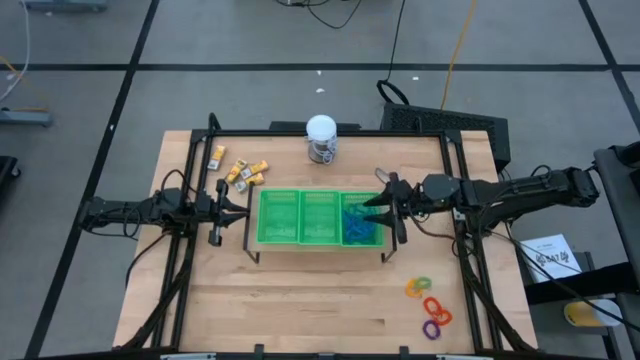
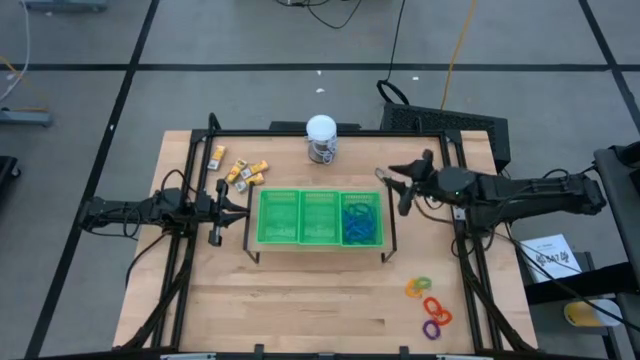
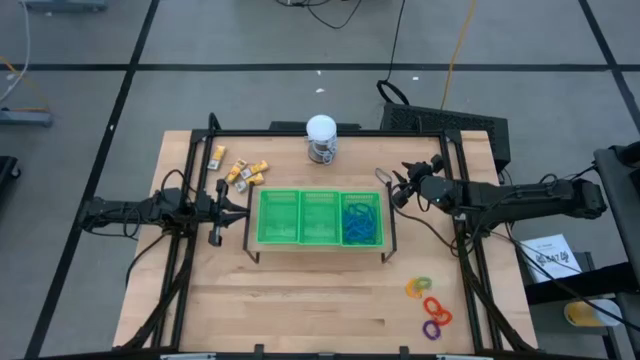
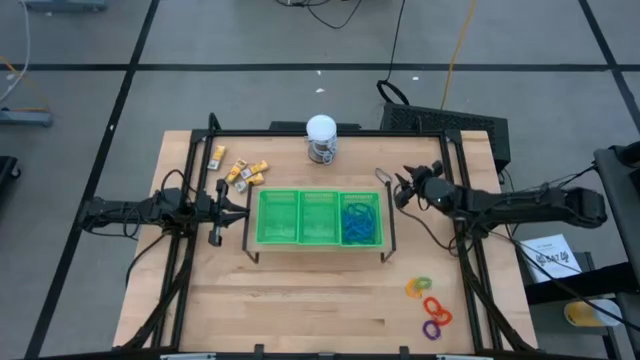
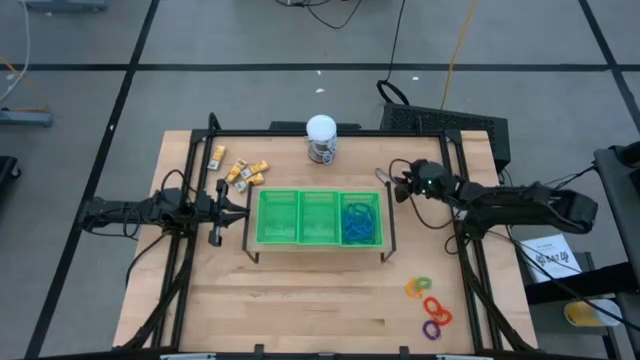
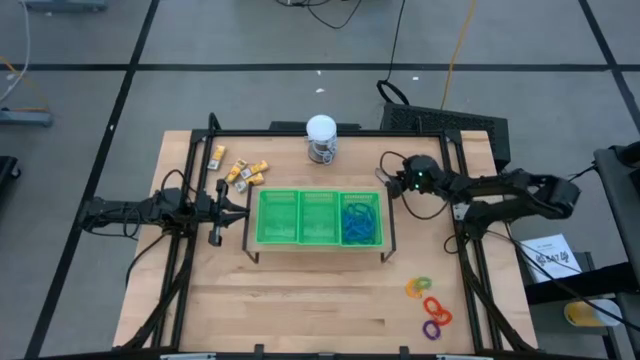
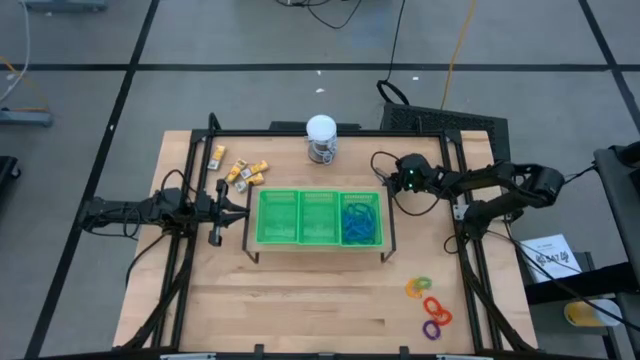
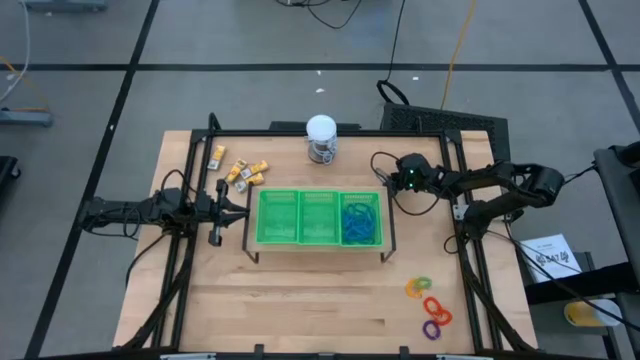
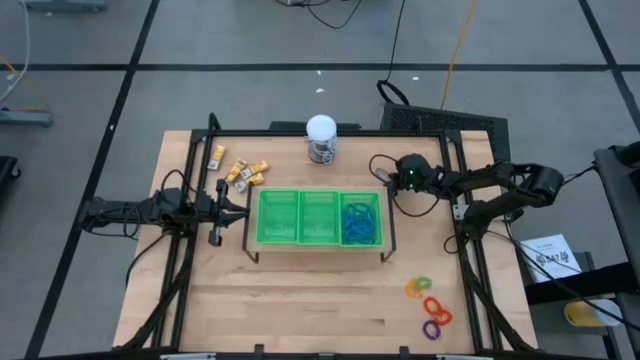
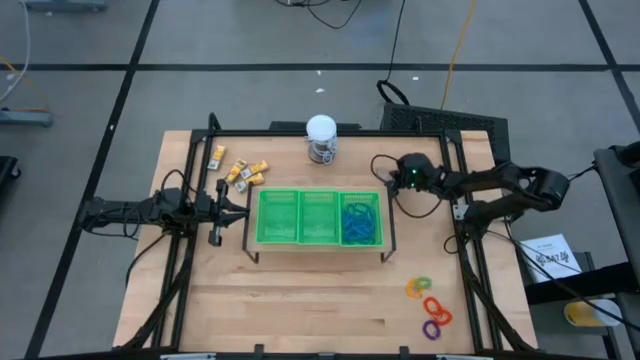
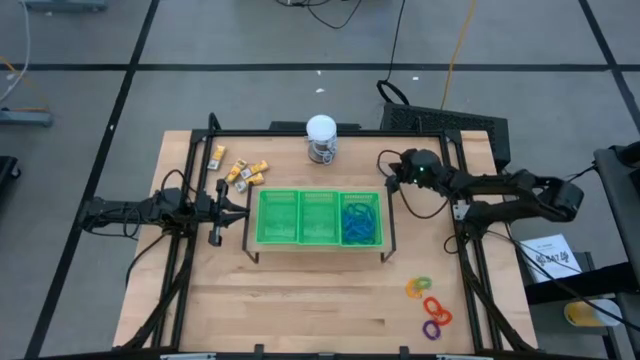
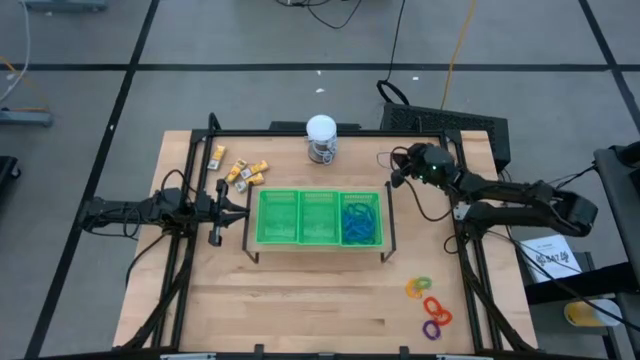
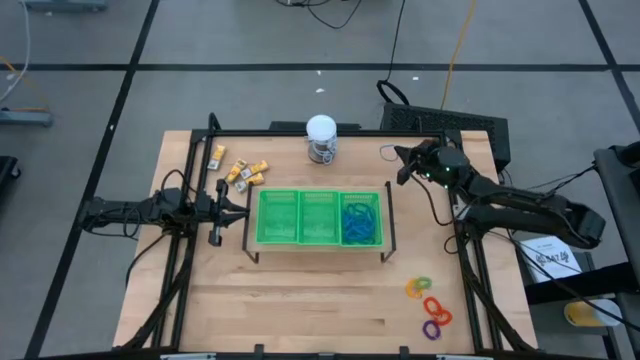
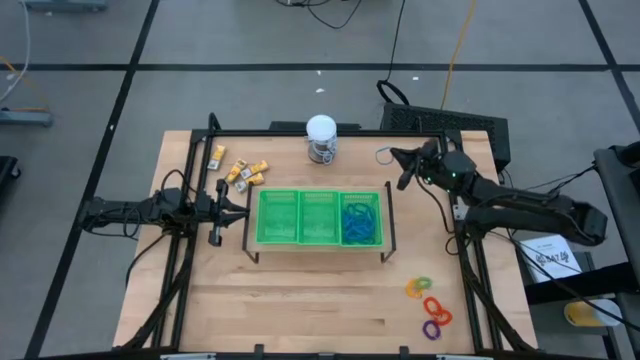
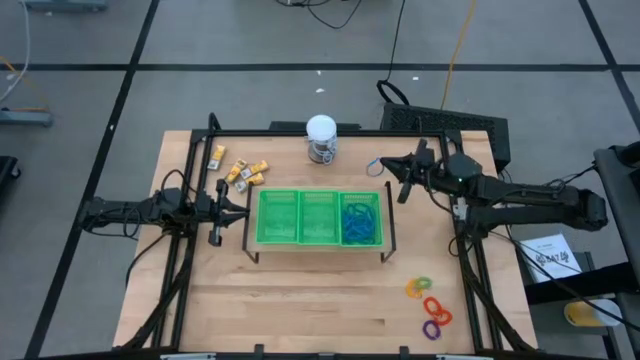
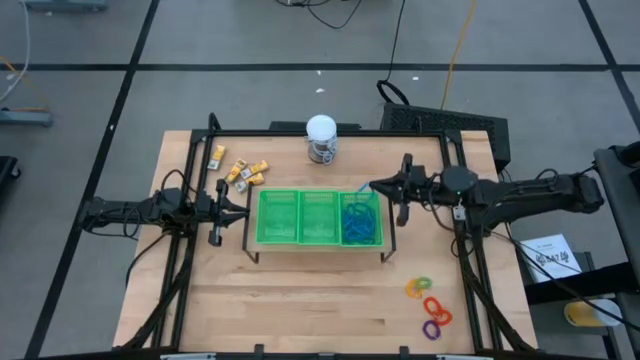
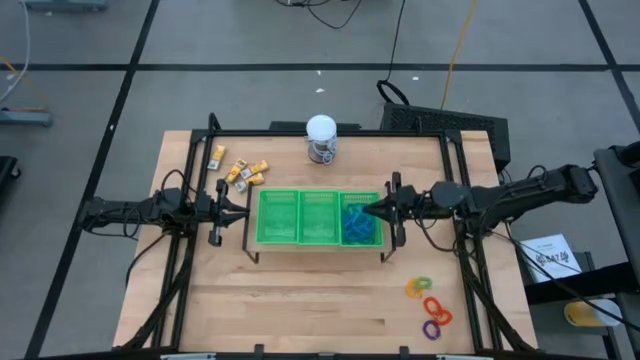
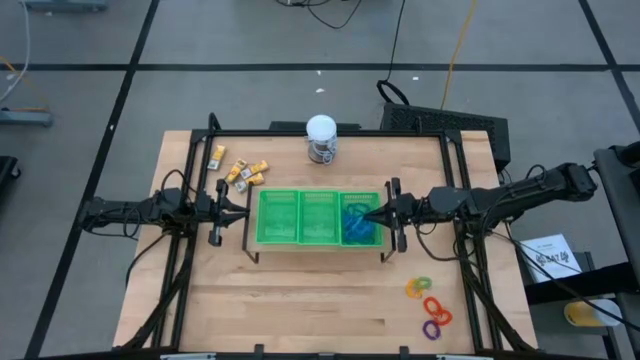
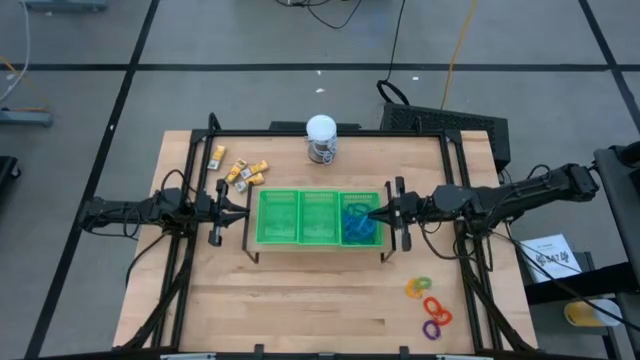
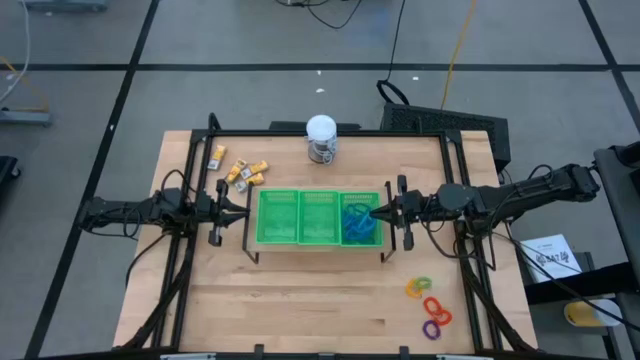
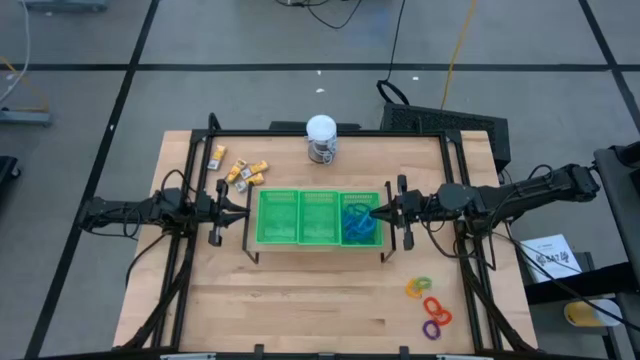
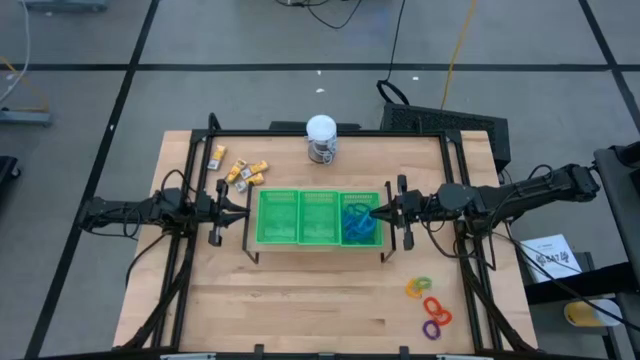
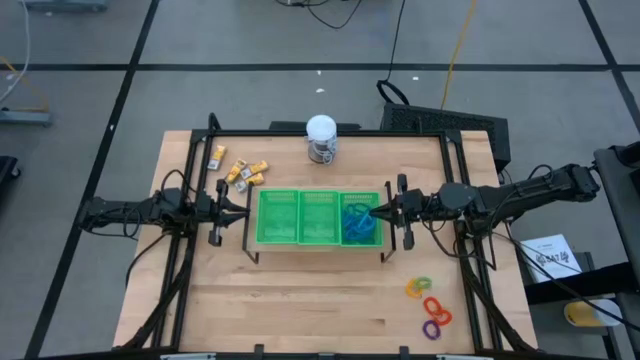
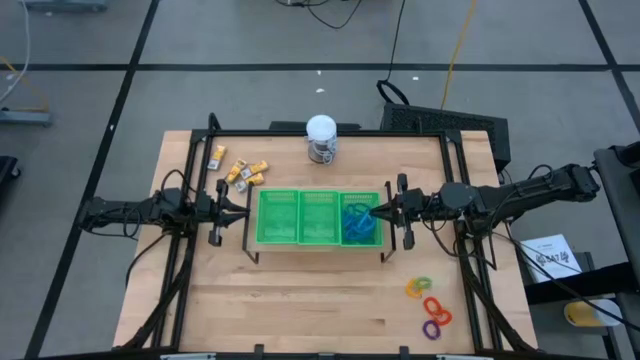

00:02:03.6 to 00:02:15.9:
Task: Pick & Place Office Desk Supplies
Put the blue rubber band into the right green bin on the shelf

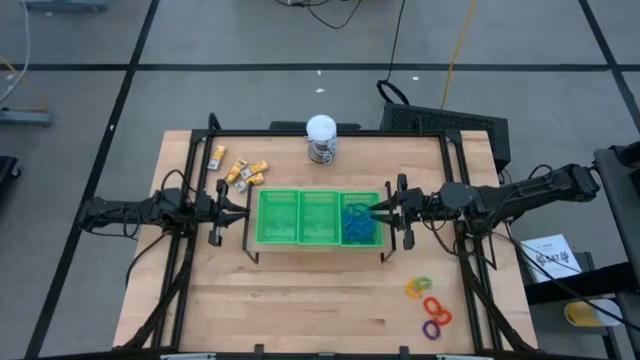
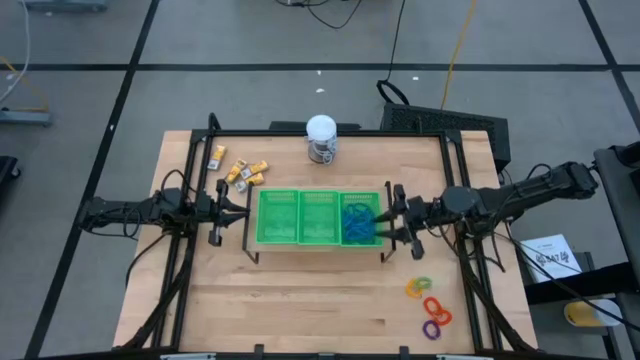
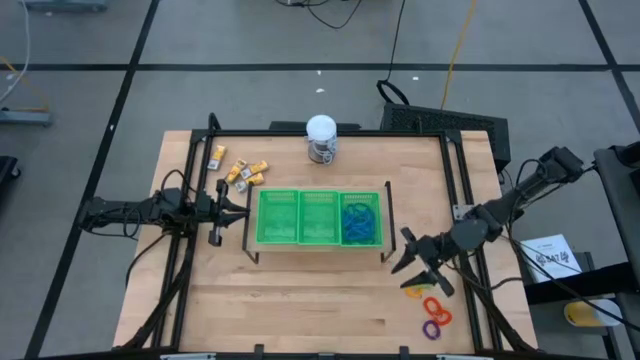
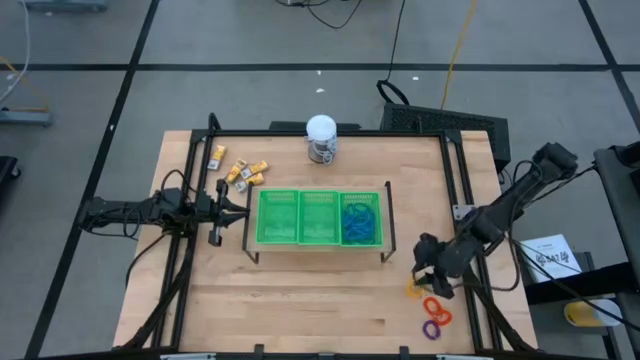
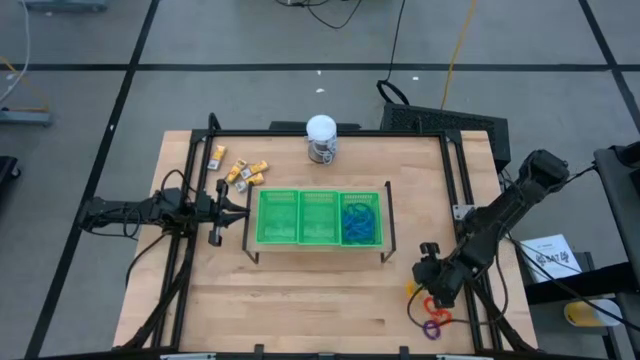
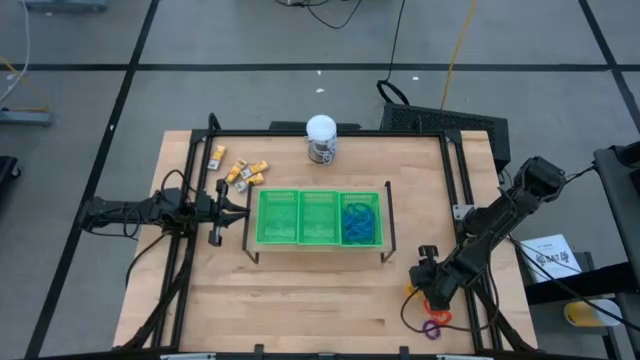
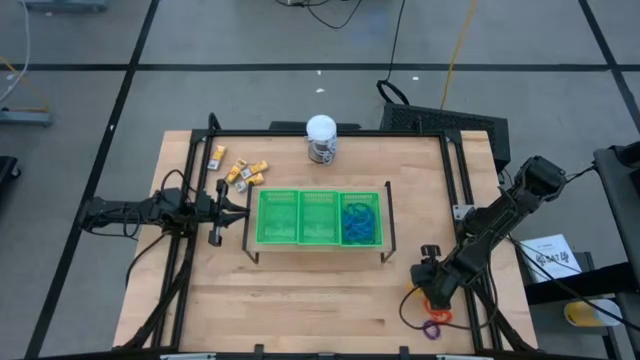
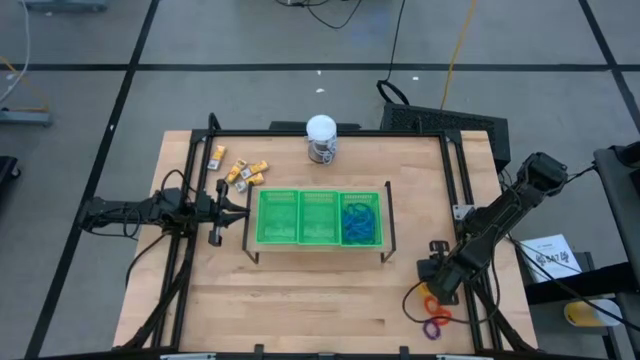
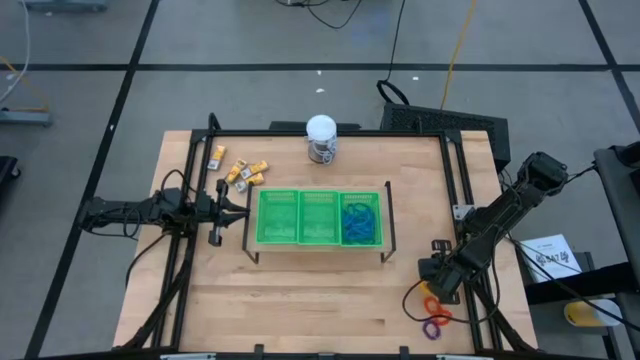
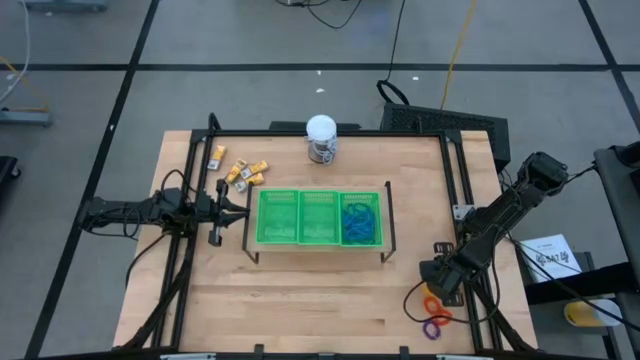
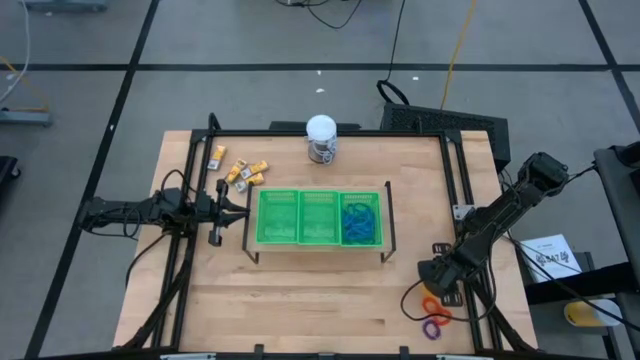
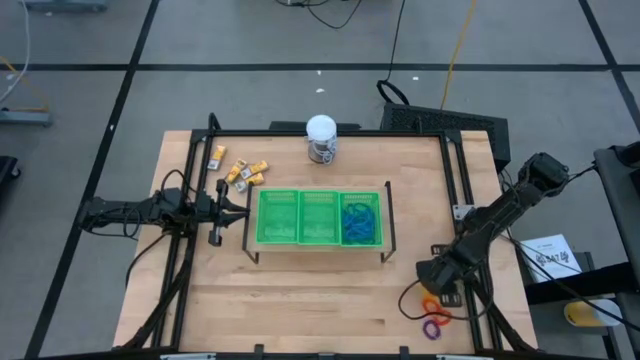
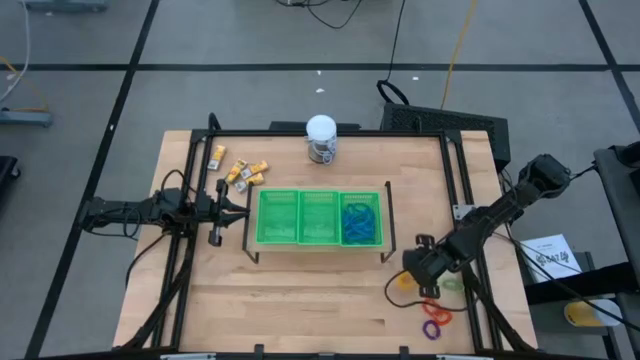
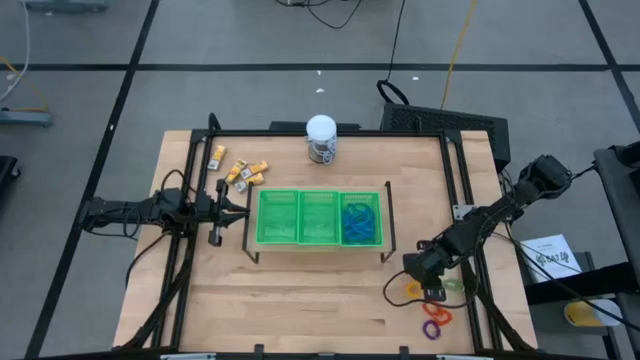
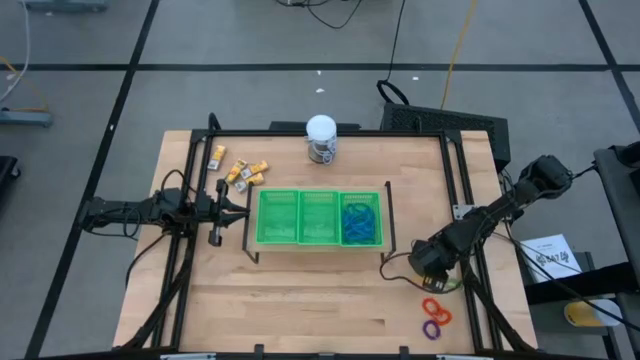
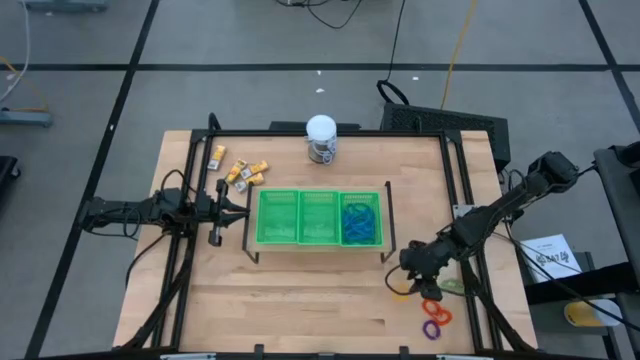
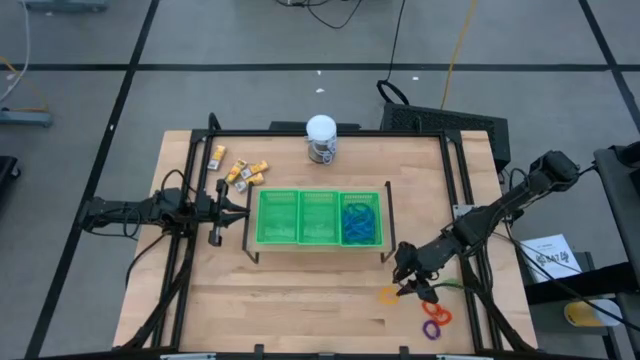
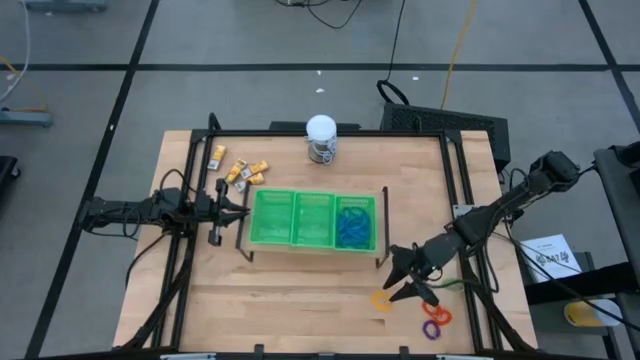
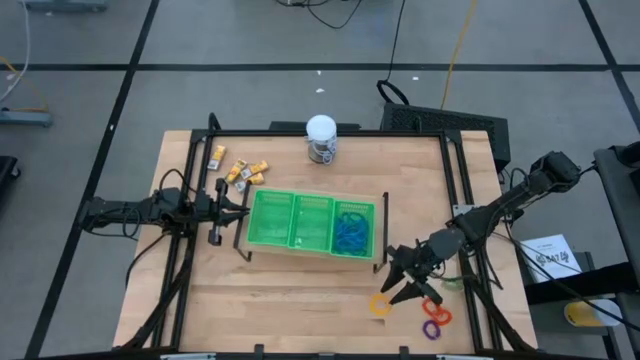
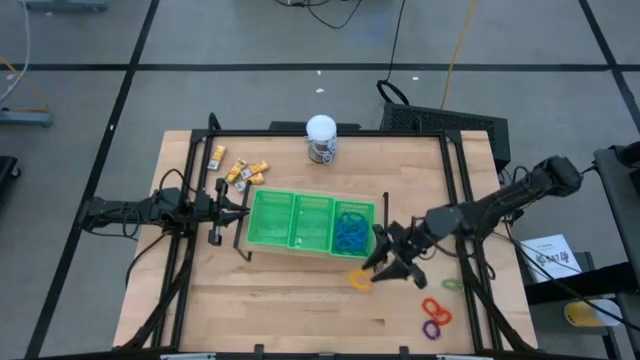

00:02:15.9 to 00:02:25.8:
Put the yellow spring keychain into the center green bin on the shelf
